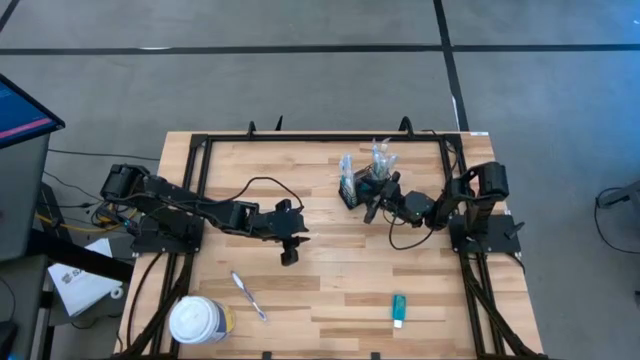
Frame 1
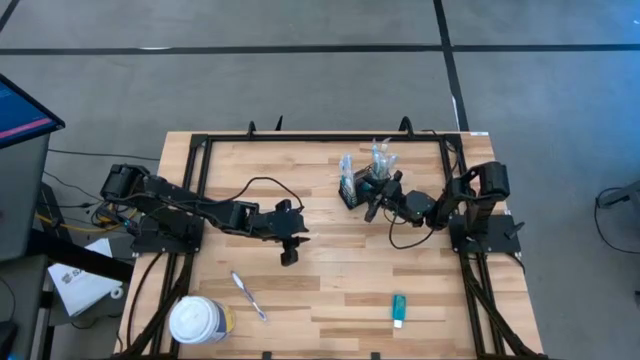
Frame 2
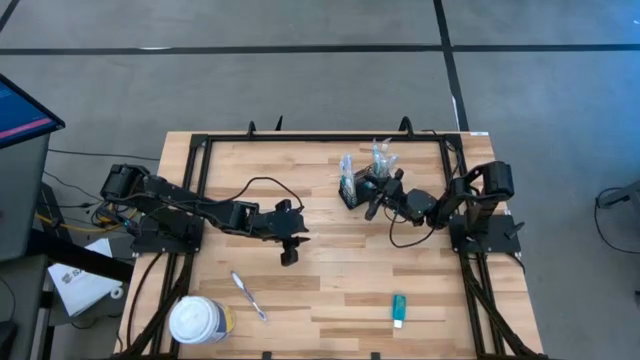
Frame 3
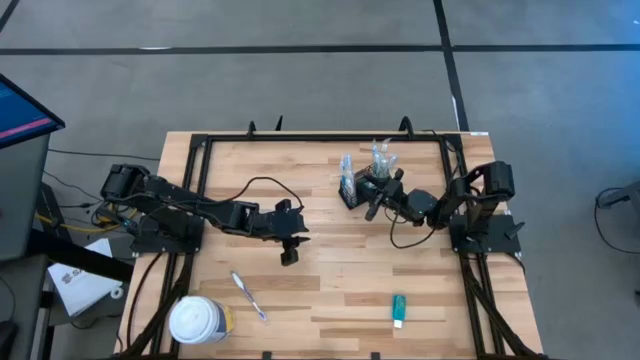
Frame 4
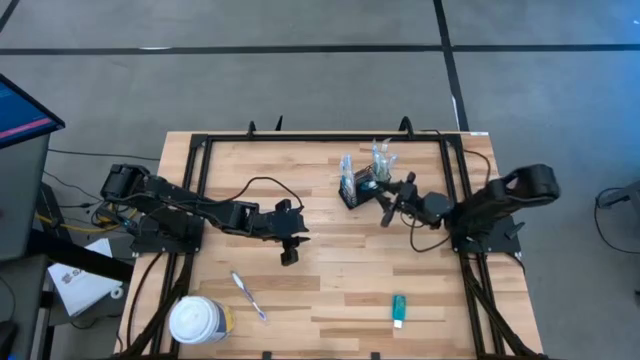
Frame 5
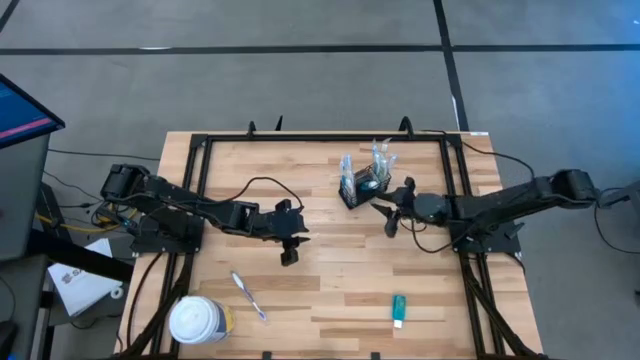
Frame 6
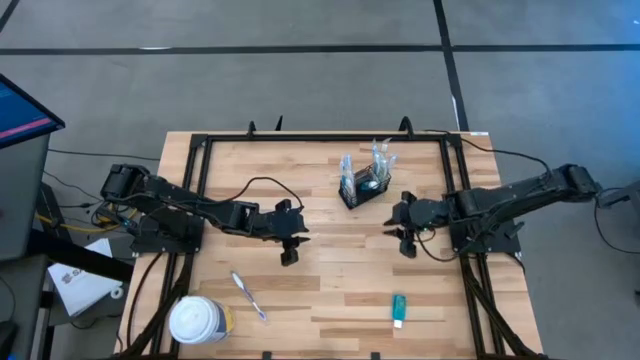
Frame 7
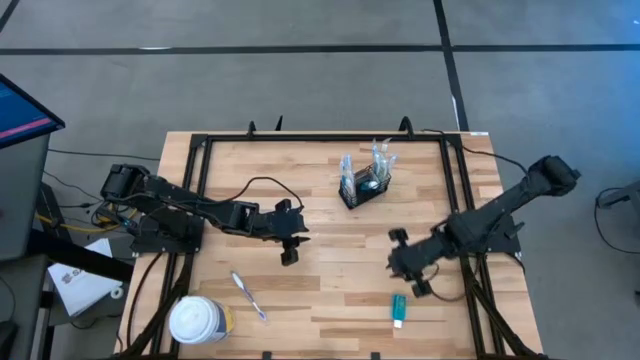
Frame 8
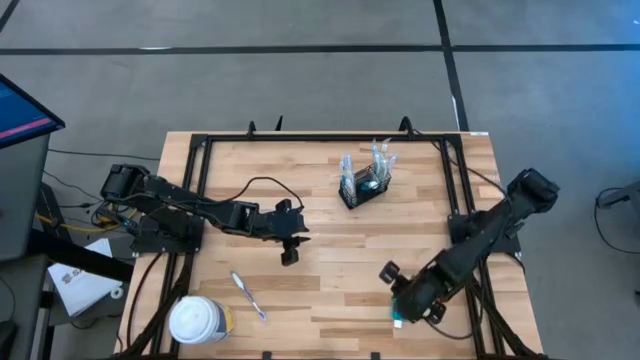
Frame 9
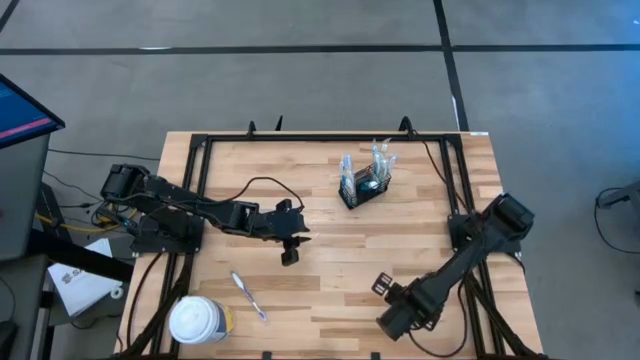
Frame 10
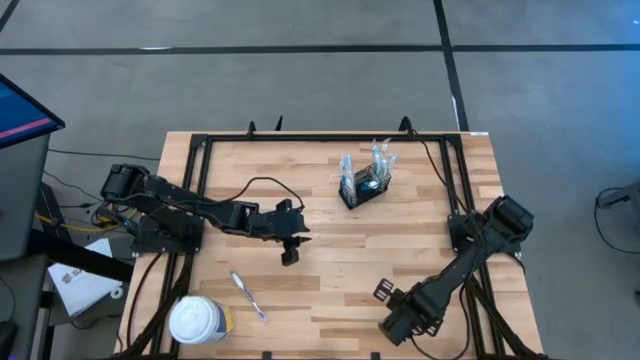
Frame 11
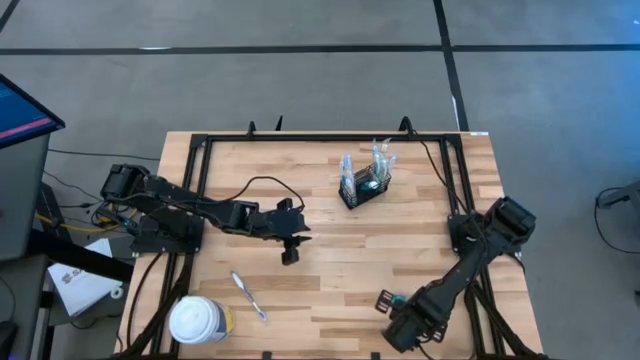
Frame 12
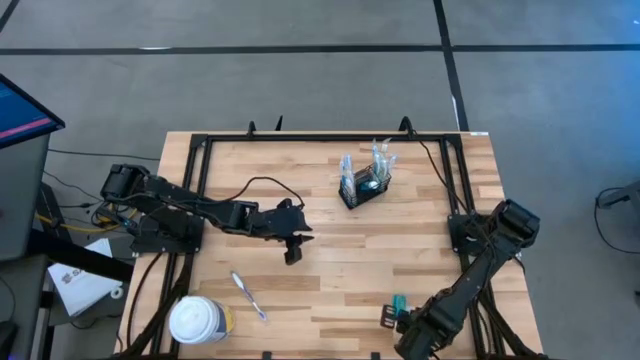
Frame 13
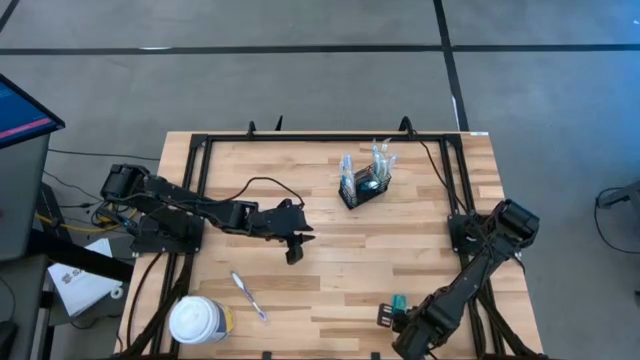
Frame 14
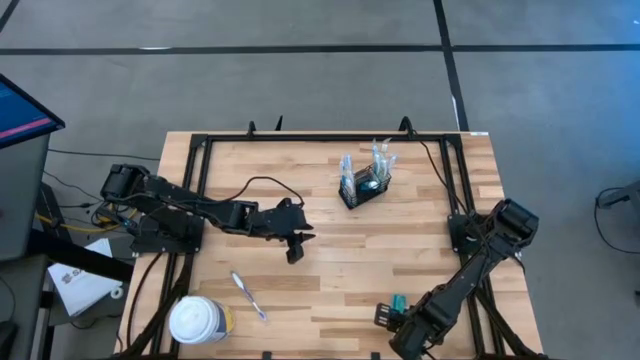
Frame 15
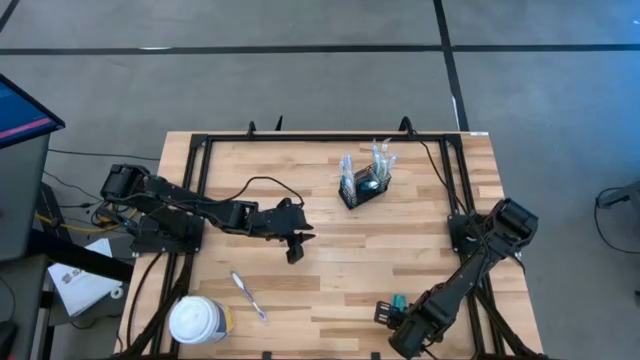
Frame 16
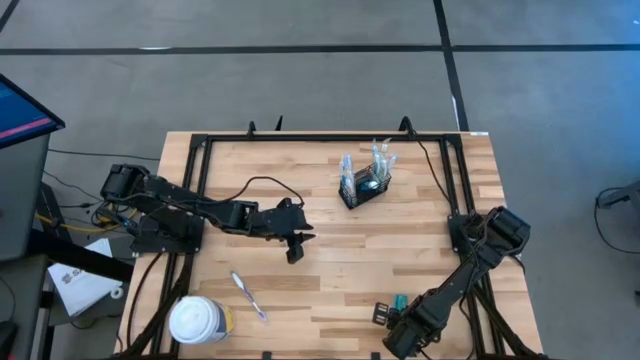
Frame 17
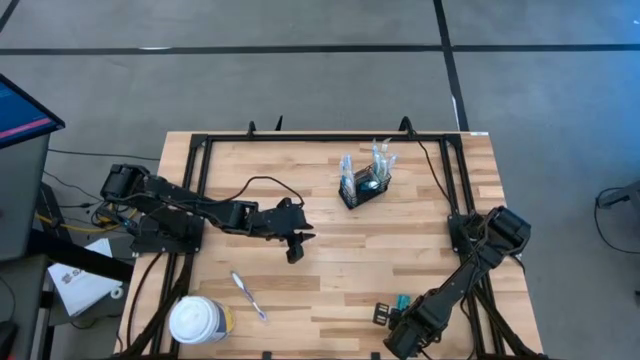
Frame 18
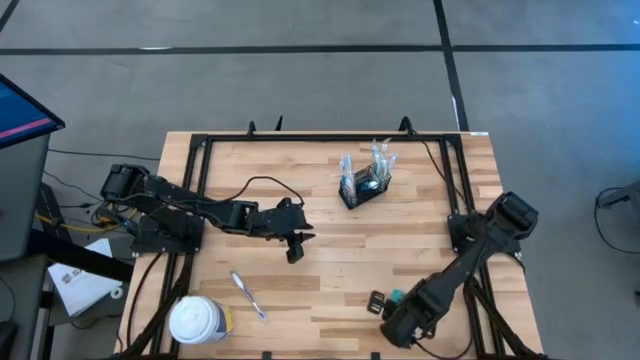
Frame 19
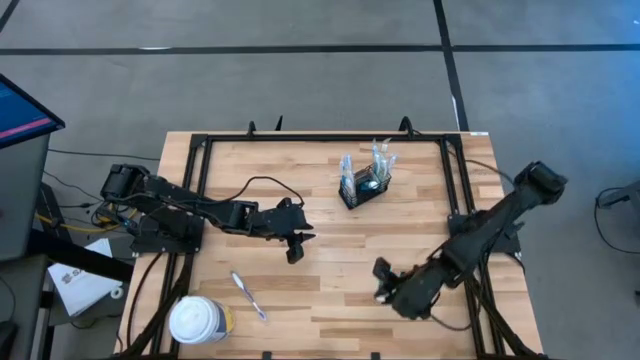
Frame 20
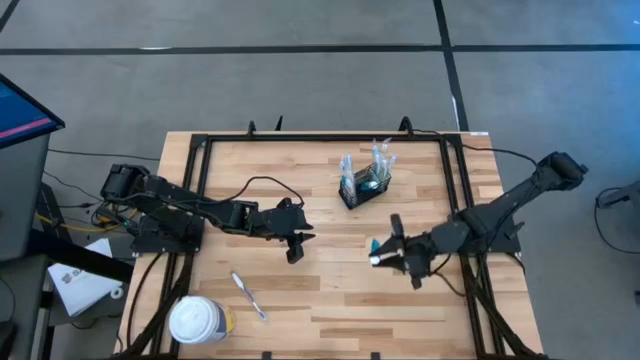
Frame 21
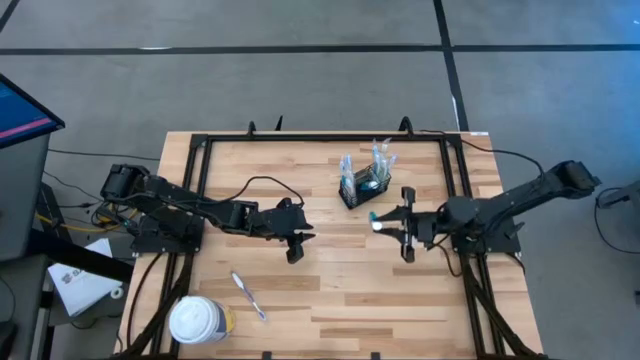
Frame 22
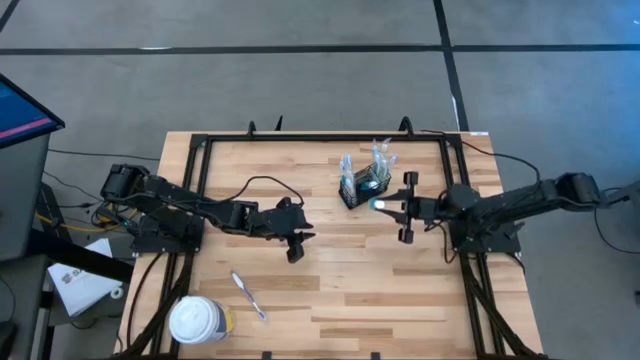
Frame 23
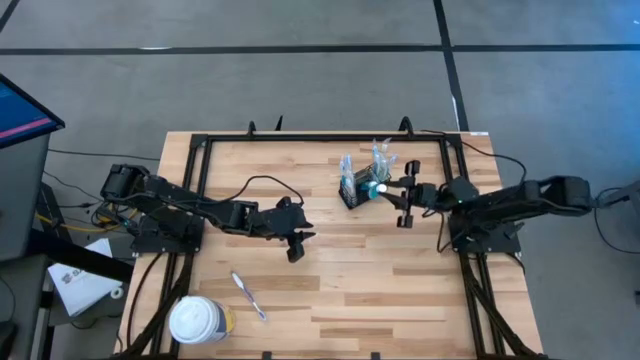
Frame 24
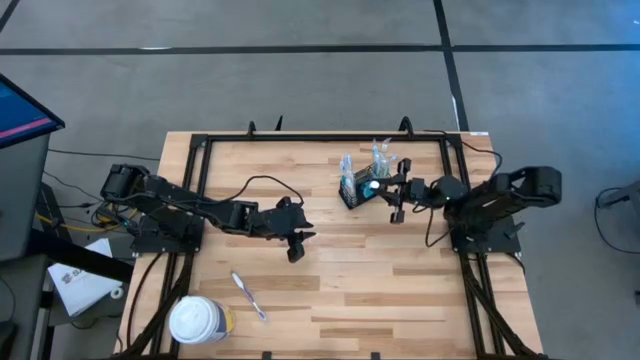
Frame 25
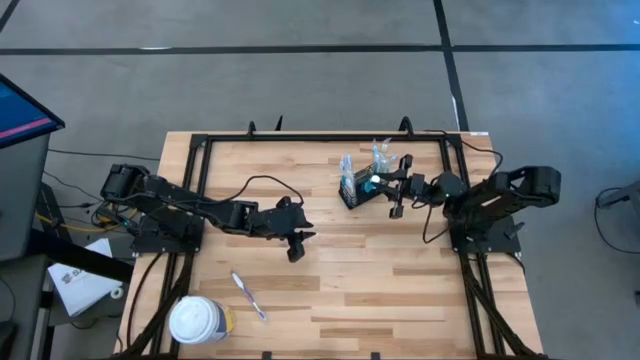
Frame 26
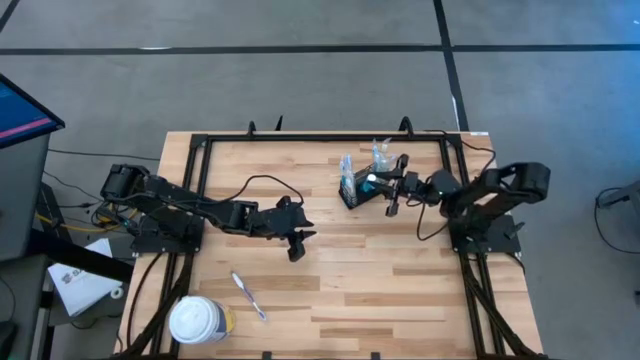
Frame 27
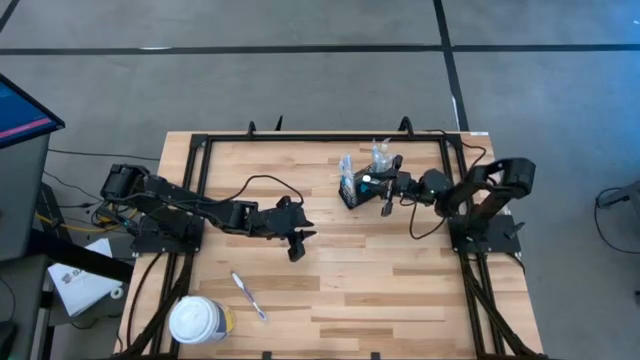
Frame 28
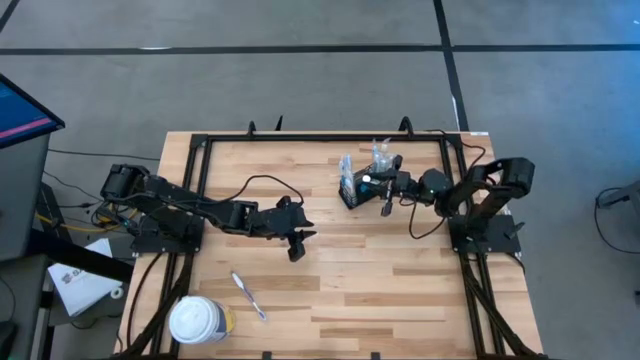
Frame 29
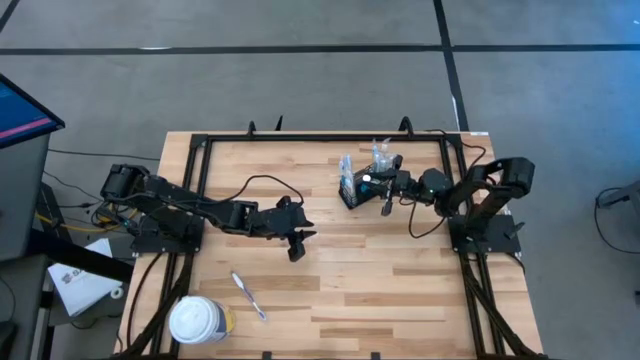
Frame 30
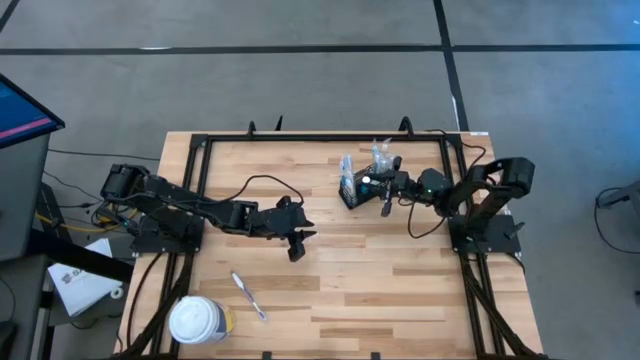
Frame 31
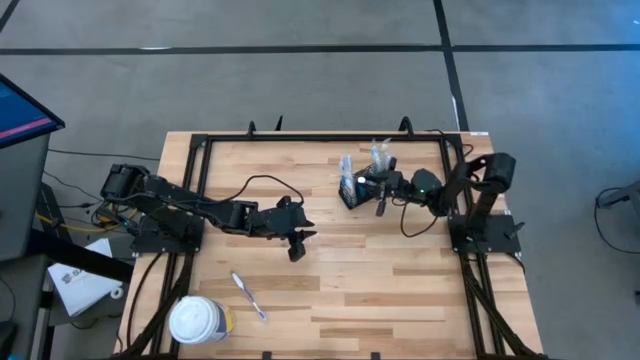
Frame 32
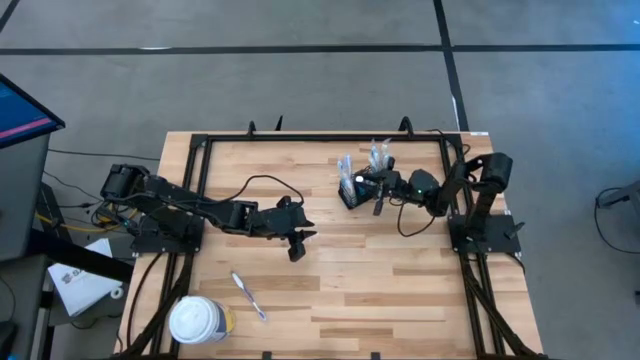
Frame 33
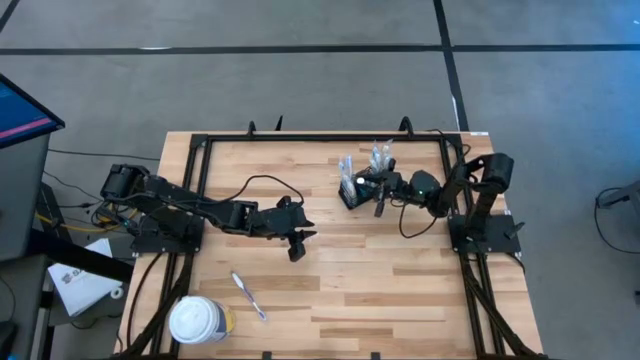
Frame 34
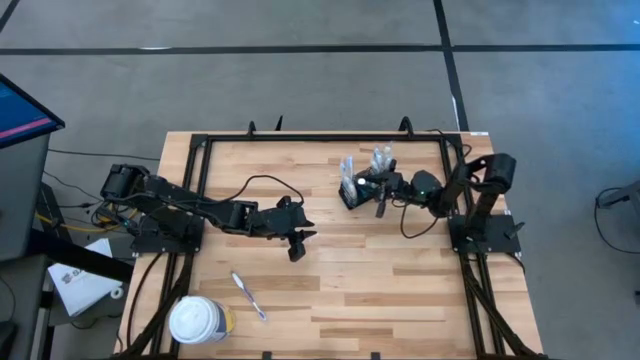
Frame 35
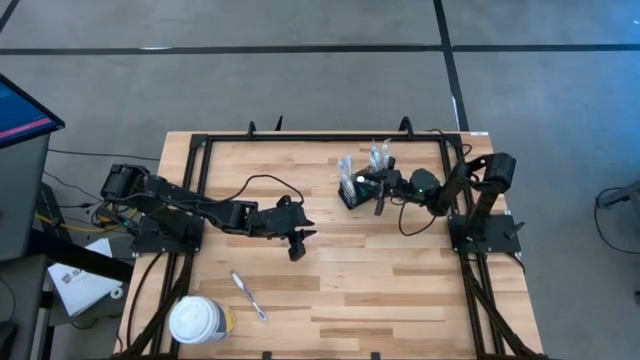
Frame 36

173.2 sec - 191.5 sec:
Task: Pick & Place toothbrushing station
Put the mouthwash bottle into the mesh organizer

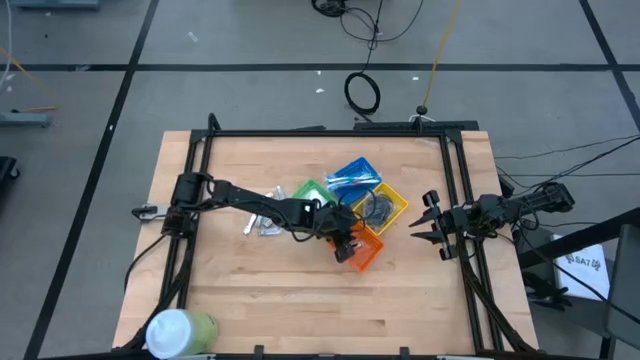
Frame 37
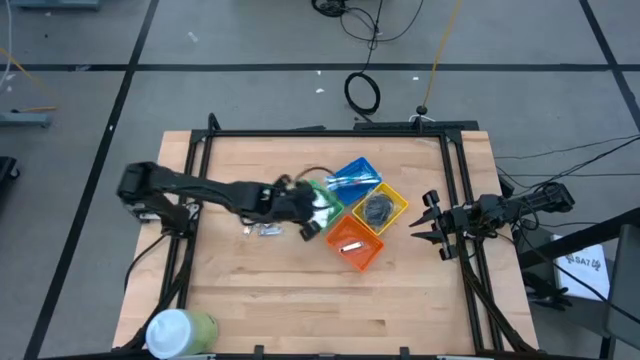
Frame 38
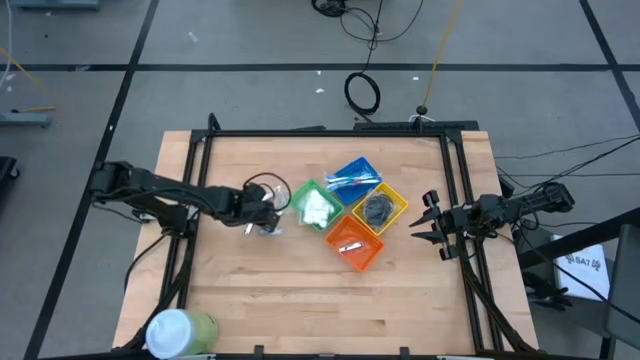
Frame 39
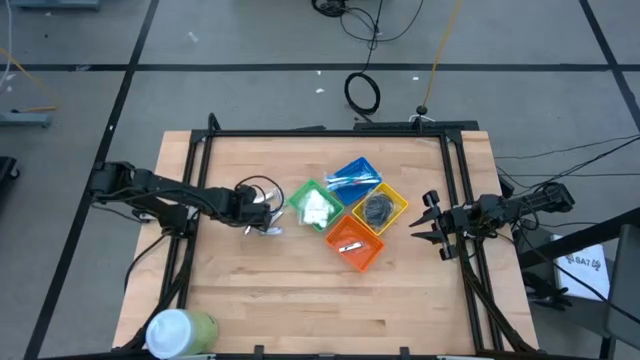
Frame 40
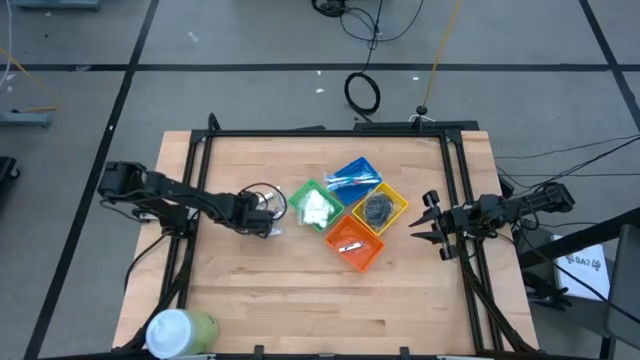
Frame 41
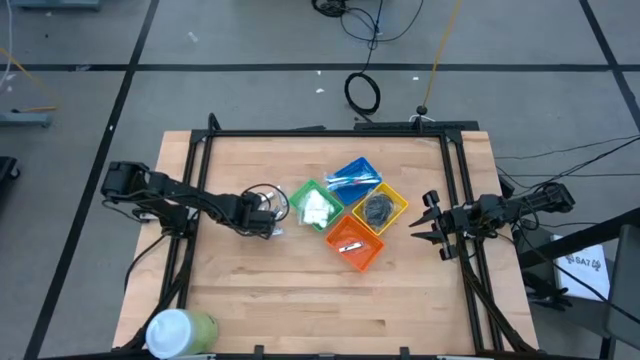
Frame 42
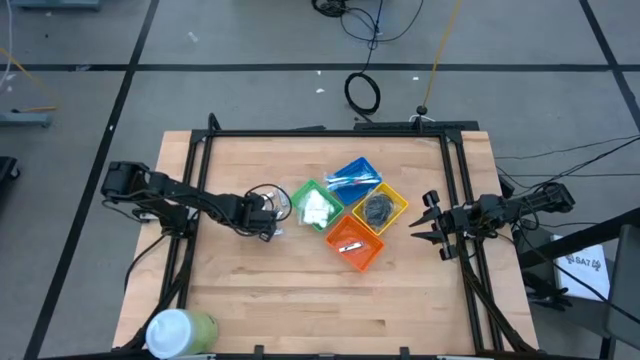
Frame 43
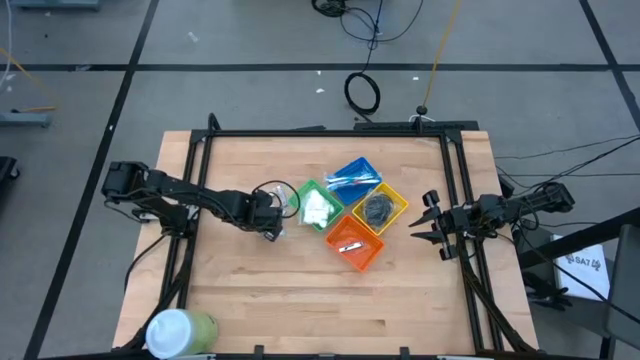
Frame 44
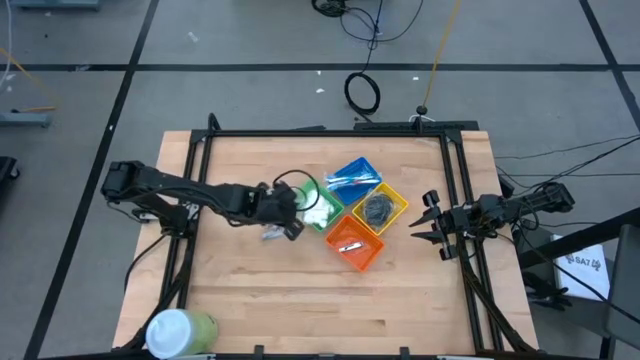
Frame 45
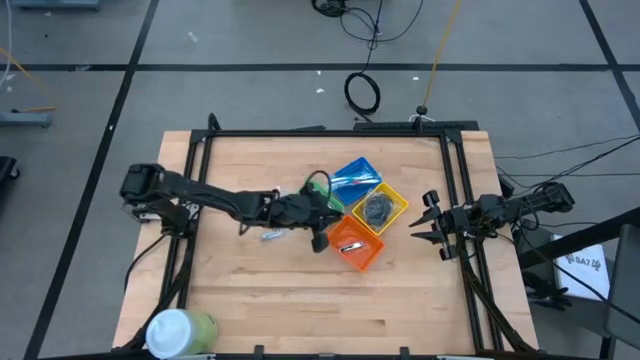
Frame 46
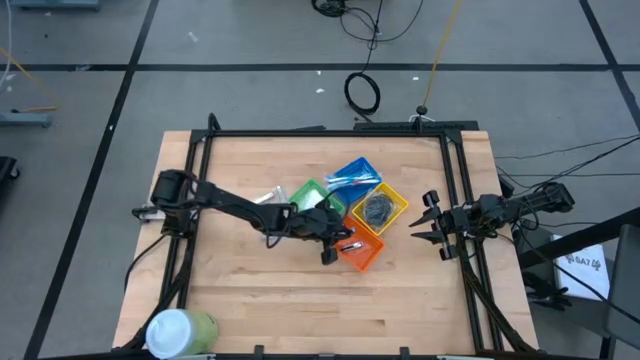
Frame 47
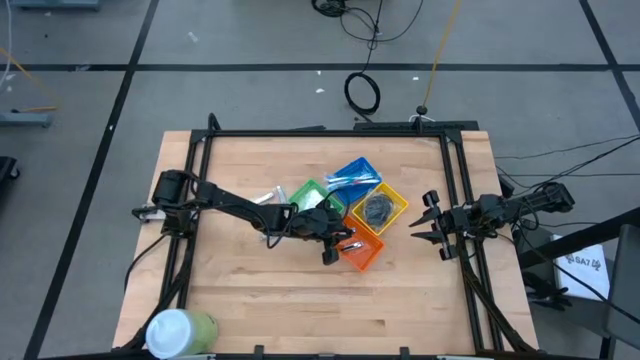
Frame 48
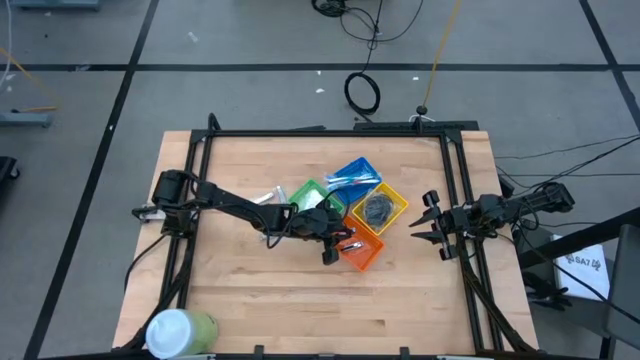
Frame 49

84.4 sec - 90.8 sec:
Task: Pick & Place Travel size toiletries
Put the silver nail cutter into the orange bin
